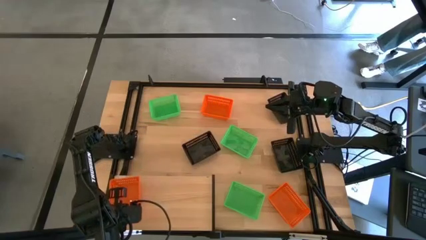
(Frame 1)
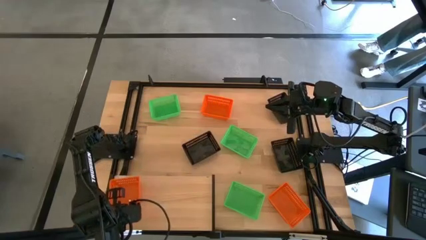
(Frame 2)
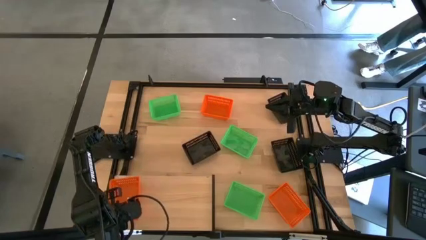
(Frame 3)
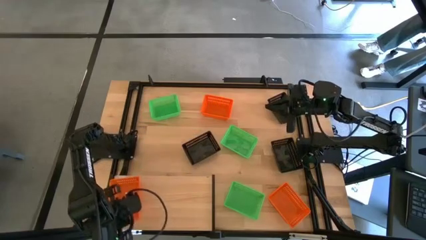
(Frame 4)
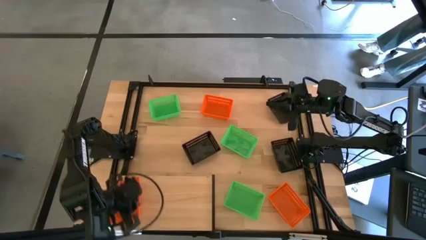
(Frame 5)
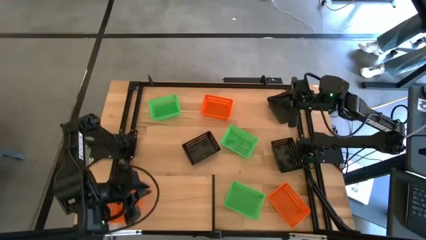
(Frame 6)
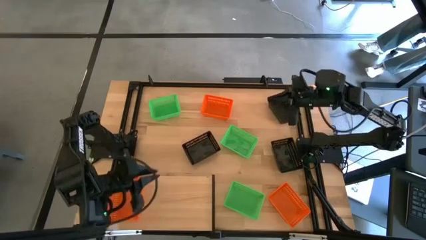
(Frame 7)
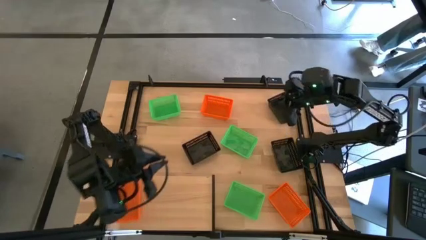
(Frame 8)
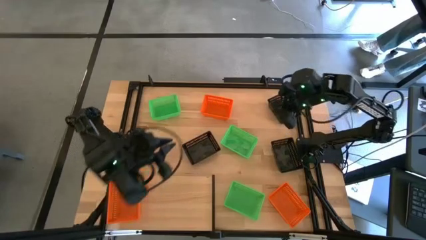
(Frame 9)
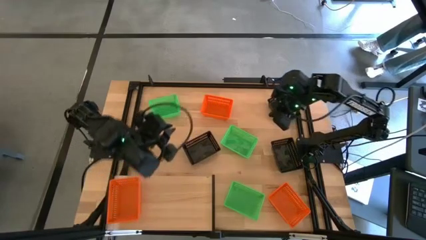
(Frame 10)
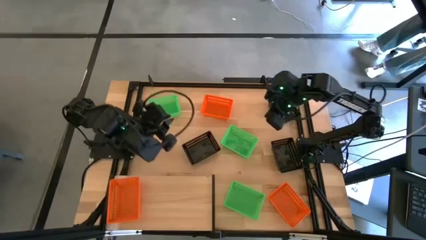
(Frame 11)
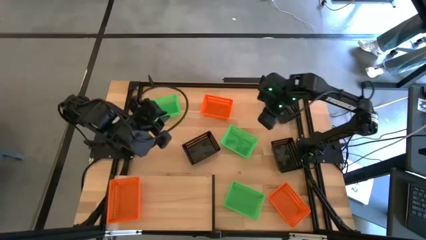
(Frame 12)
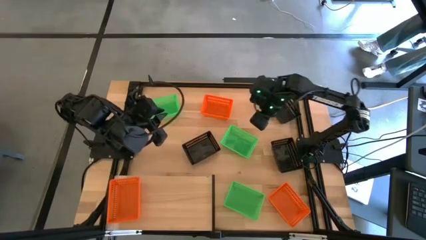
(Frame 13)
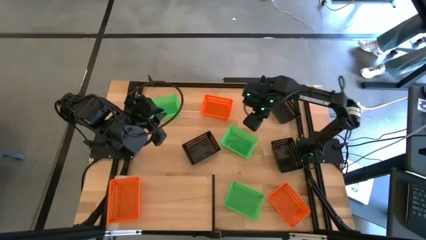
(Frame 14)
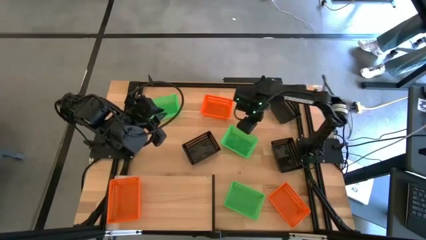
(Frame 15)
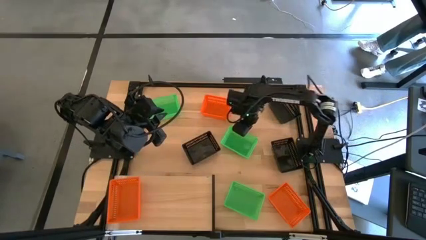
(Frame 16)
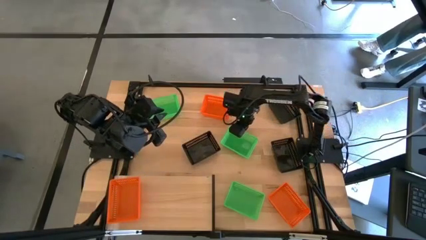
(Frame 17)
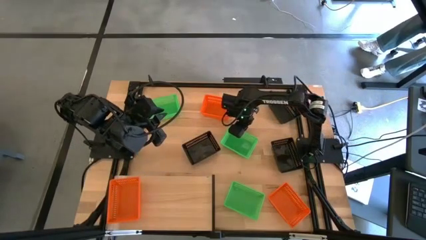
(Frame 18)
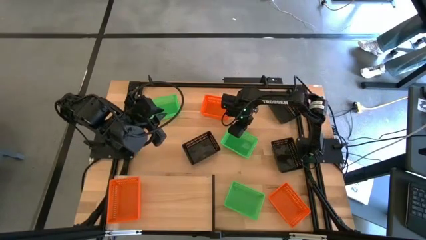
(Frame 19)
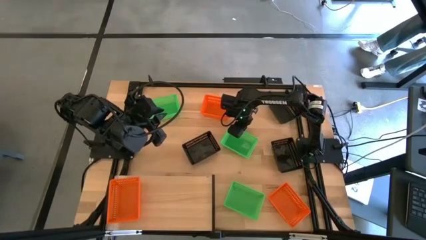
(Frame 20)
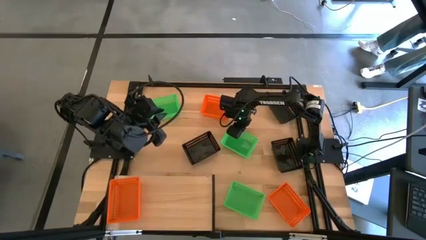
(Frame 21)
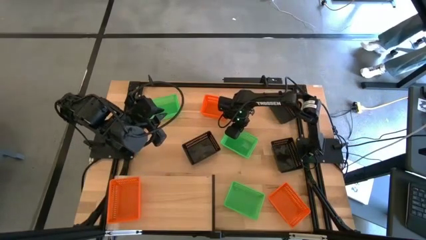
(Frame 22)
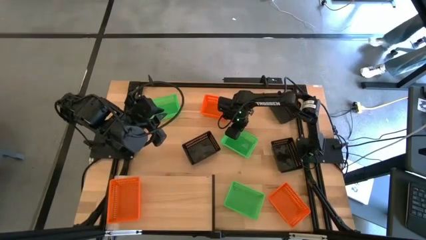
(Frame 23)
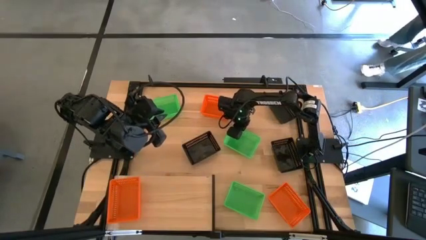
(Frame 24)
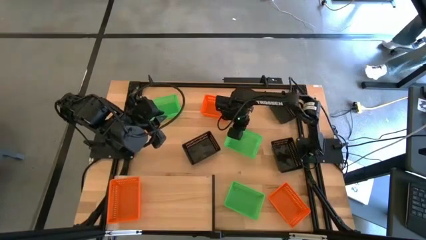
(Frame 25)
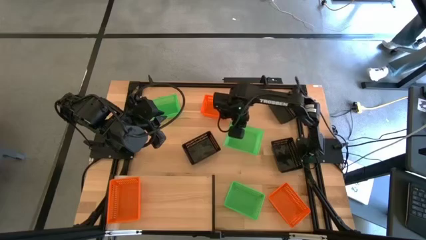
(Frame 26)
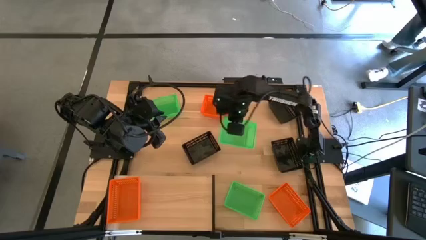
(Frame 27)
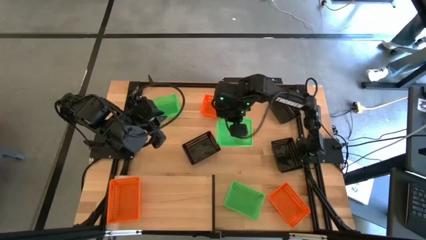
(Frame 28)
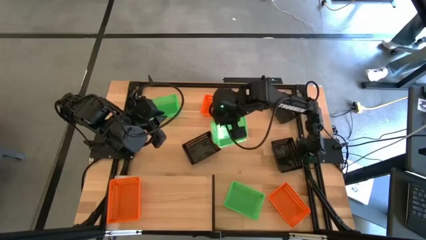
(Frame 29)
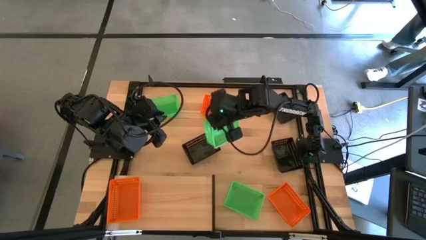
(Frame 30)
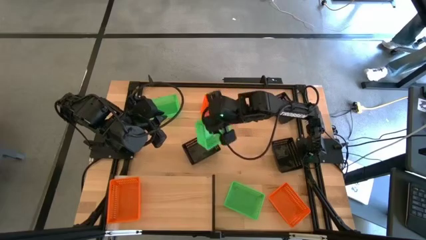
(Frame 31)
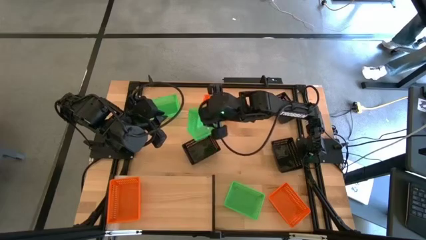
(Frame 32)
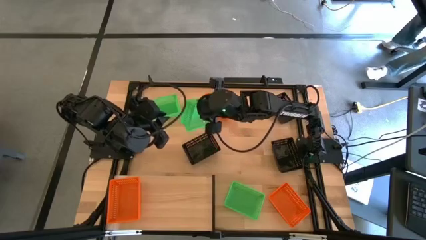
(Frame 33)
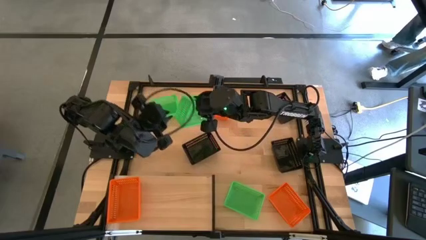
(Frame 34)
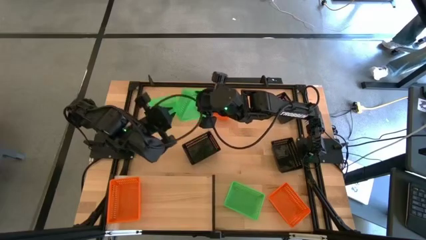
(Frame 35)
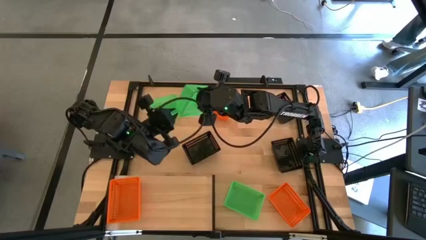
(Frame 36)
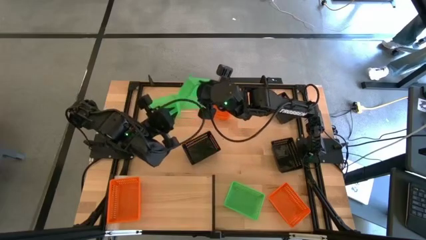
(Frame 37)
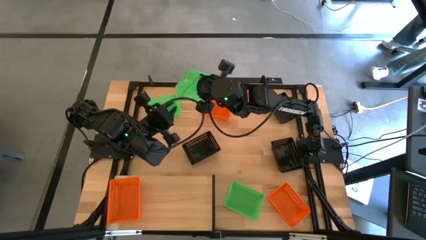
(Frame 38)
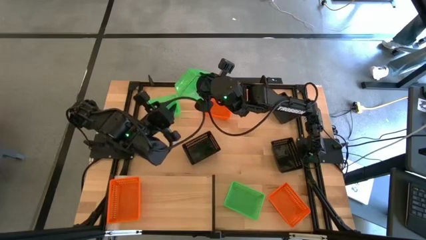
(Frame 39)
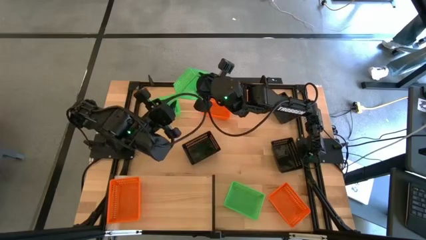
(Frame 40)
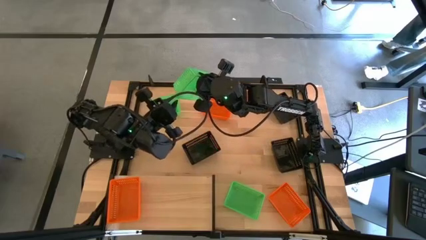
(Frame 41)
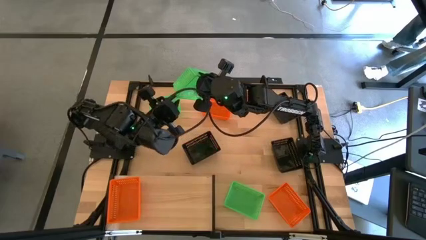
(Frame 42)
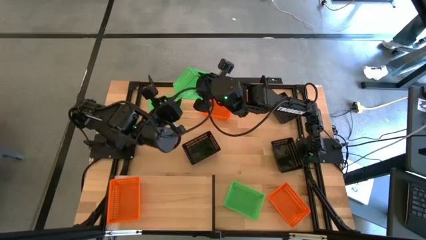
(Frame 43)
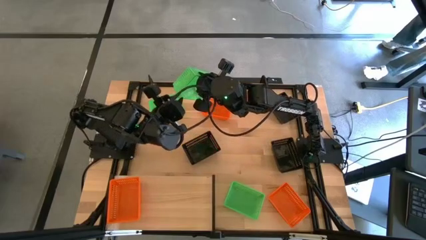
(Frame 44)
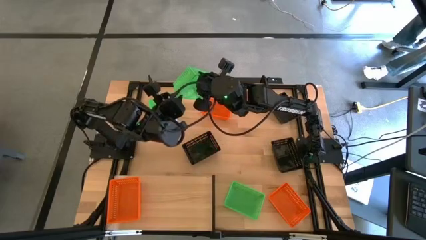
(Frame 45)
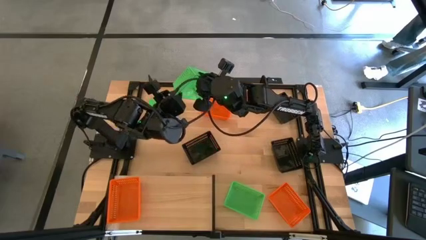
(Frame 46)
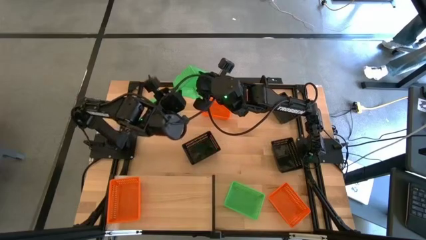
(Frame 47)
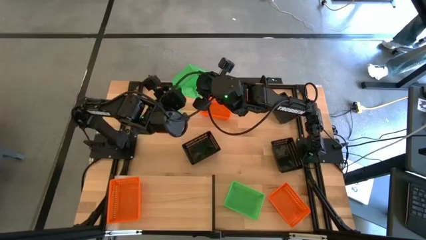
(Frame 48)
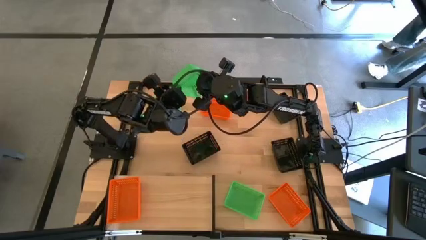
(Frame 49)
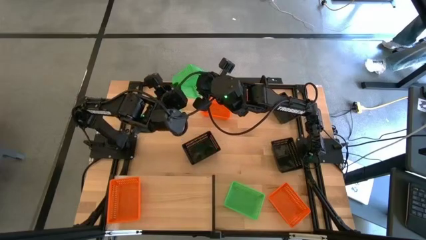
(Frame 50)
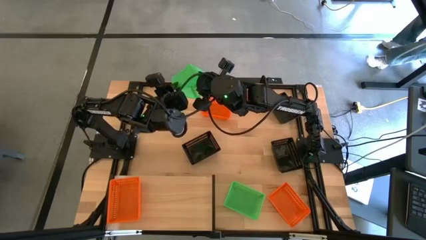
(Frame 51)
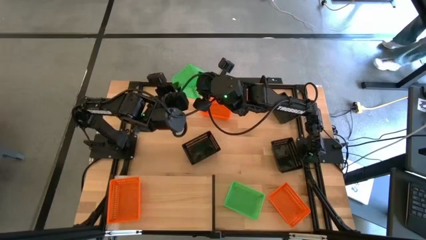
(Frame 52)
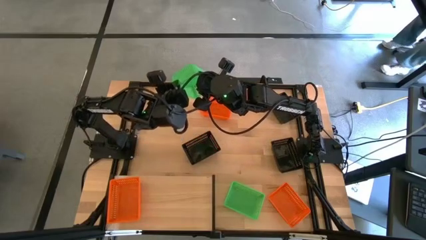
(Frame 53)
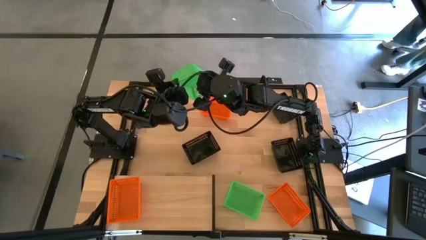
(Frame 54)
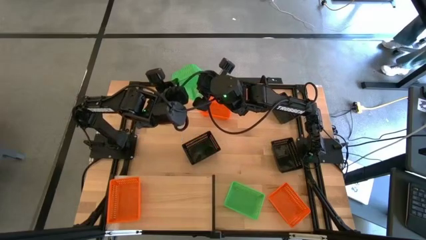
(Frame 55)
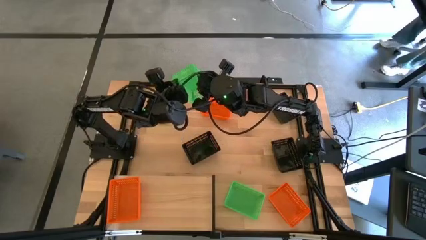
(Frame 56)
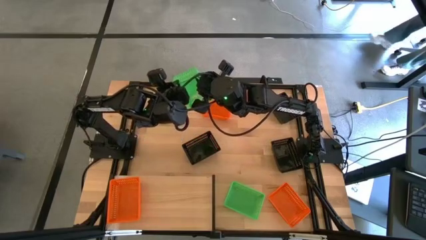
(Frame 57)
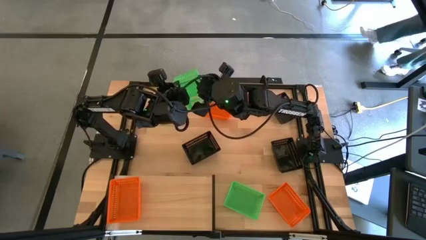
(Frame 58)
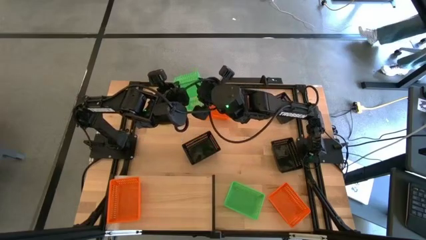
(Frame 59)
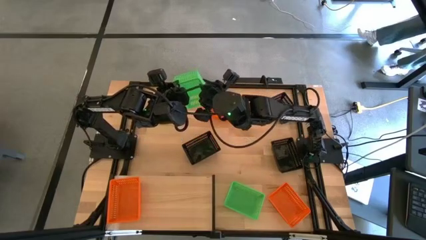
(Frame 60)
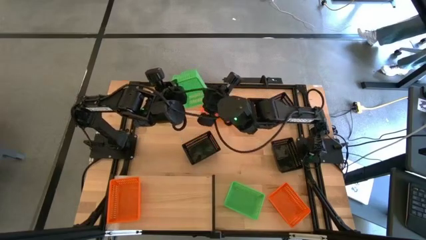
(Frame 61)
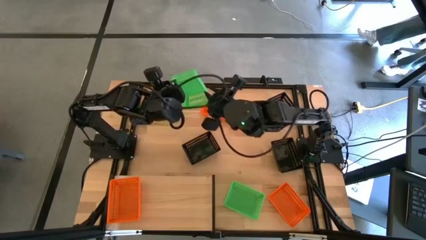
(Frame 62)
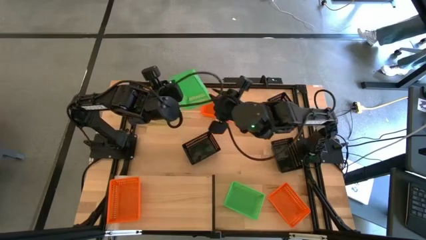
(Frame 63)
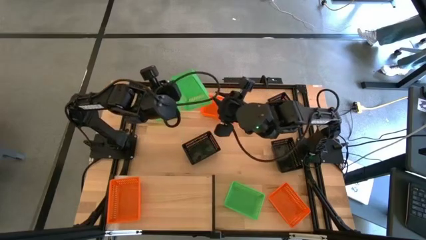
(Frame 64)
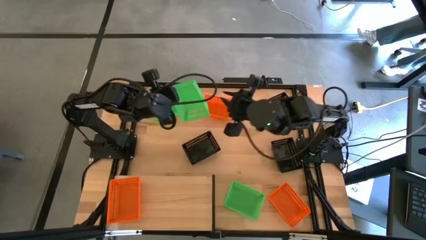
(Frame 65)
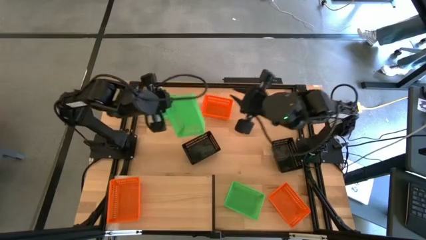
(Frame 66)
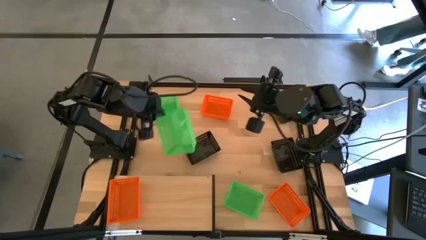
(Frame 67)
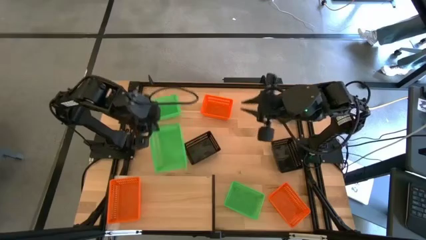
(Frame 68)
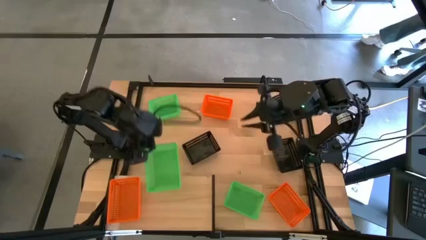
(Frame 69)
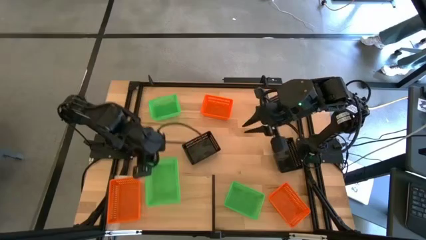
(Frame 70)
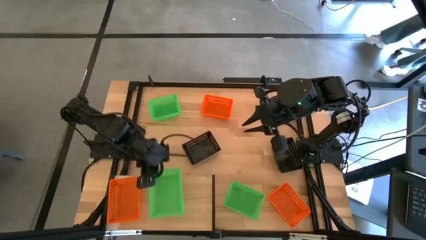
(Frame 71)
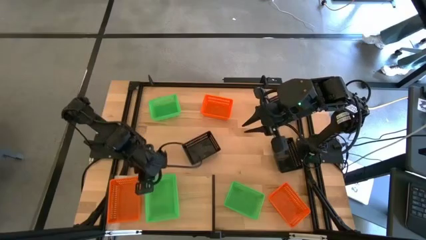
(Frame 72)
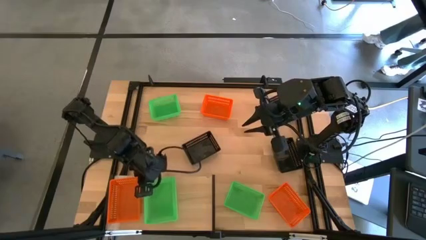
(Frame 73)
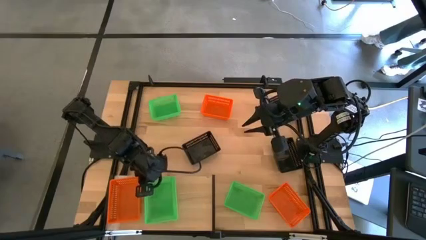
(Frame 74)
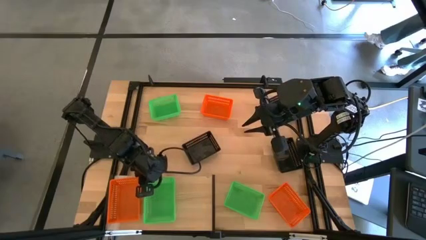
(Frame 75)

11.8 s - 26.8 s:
Task: Stack baskets on shelf by color
Put the middle green basket on the shelf

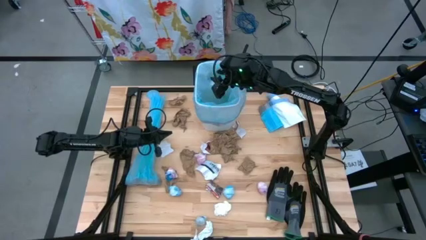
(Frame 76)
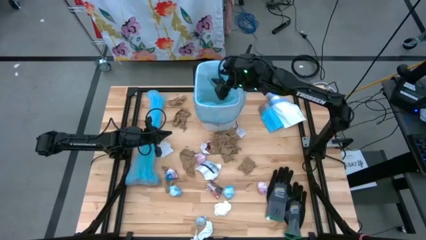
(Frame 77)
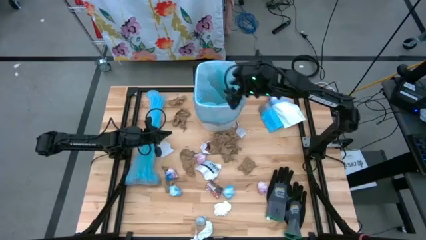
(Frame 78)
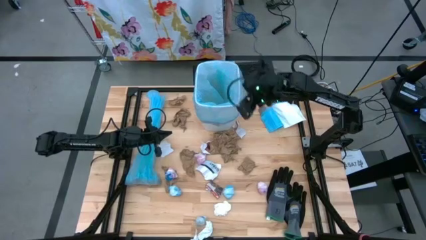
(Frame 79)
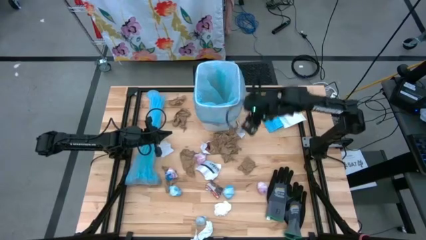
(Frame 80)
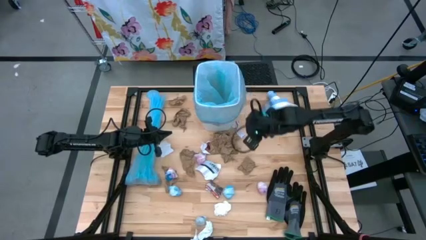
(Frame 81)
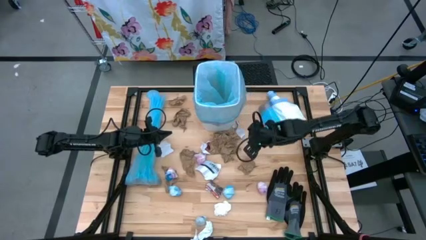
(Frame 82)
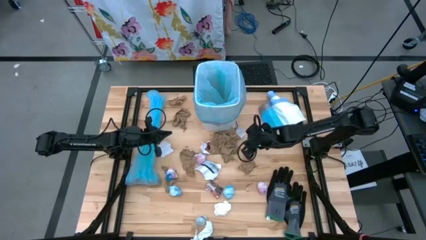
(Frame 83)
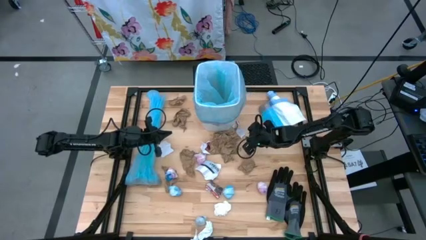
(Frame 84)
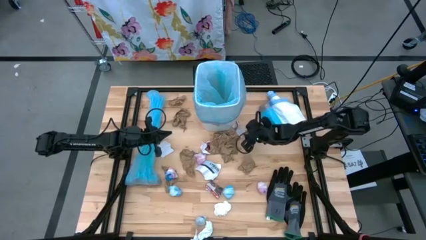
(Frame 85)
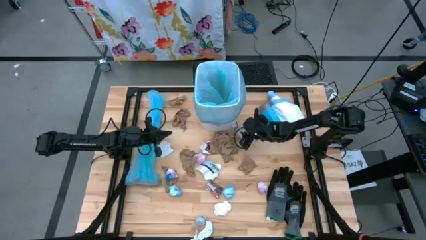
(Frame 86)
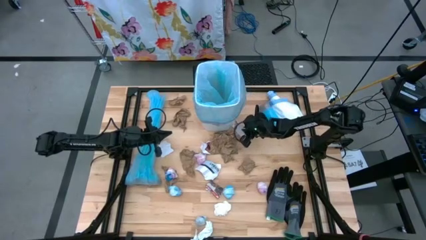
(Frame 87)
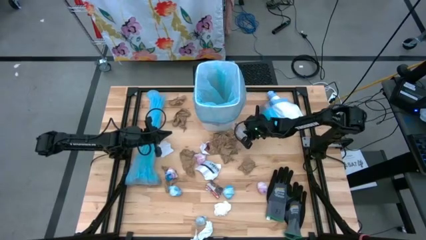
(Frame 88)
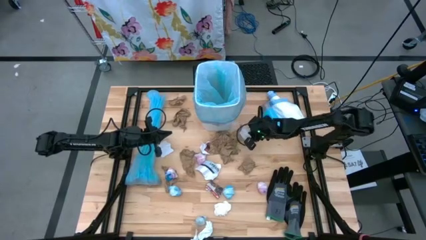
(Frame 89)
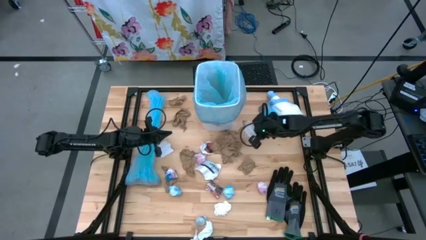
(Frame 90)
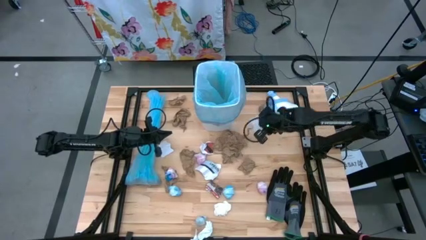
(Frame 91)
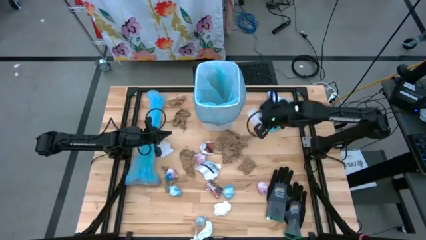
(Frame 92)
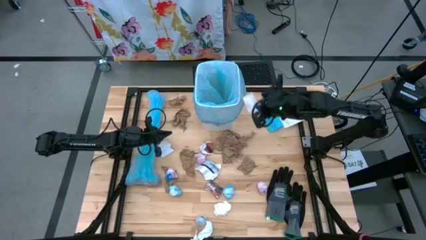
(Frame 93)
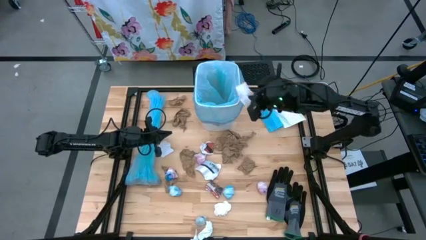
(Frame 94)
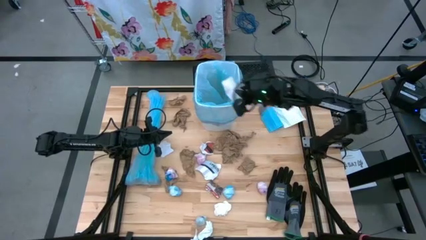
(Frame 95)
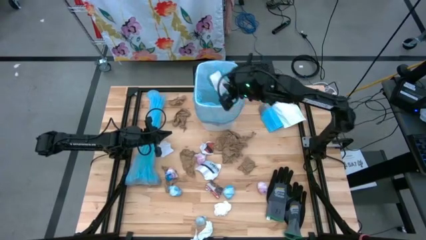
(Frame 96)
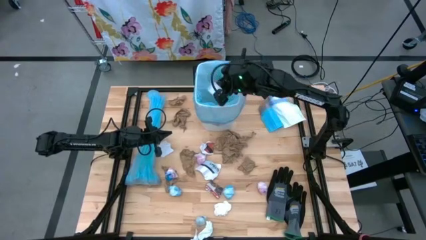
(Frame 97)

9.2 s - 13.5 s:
Task: place trash/remove bag and relplace
Put the white paper into the blue trash bag inside the white trash bin
